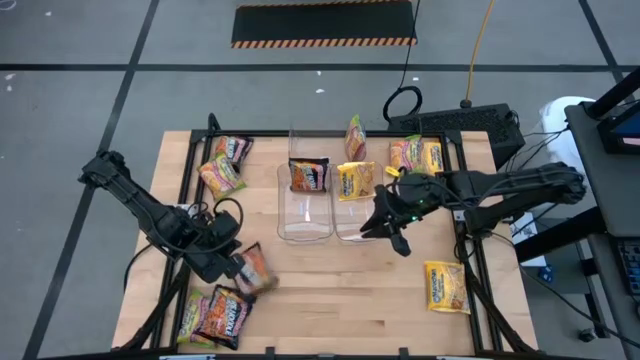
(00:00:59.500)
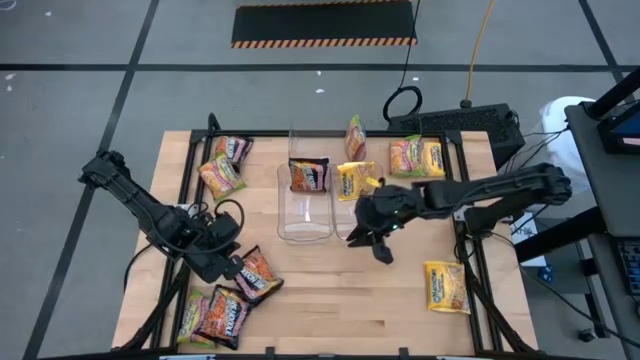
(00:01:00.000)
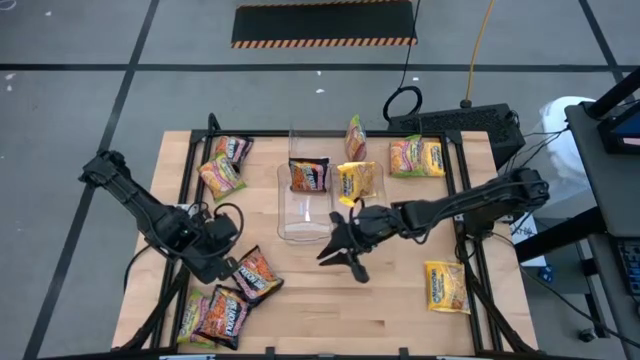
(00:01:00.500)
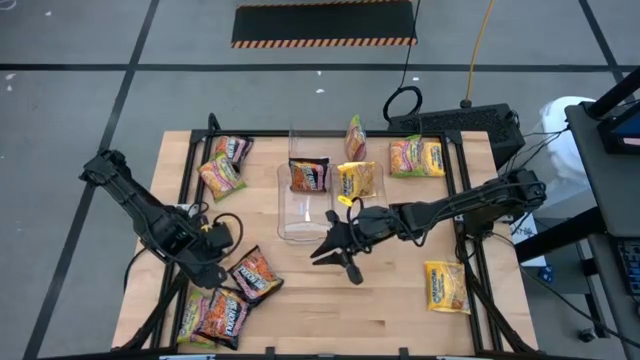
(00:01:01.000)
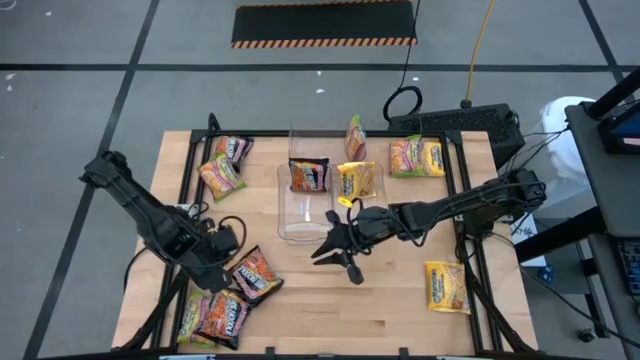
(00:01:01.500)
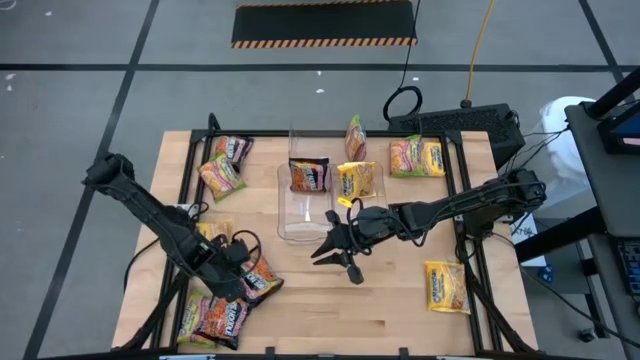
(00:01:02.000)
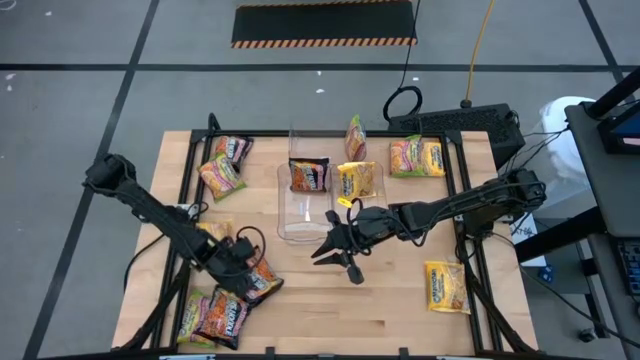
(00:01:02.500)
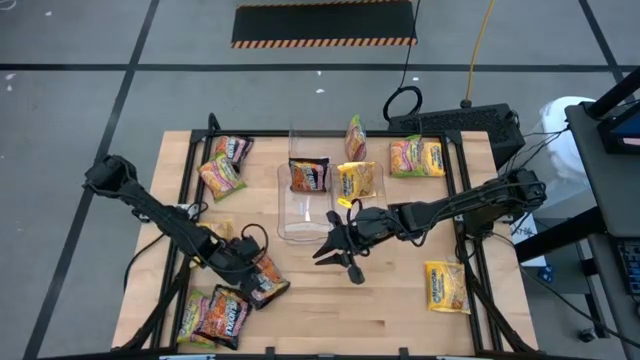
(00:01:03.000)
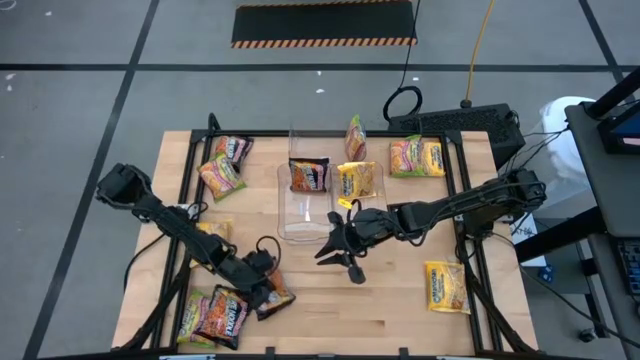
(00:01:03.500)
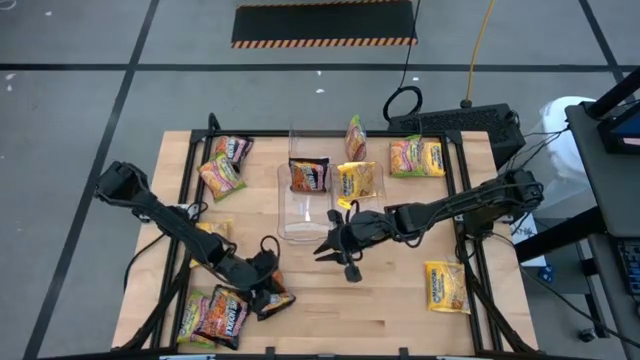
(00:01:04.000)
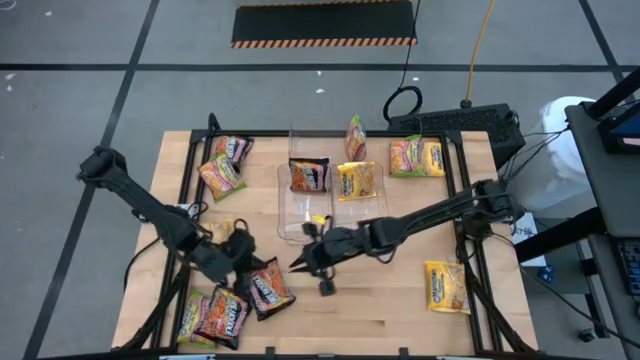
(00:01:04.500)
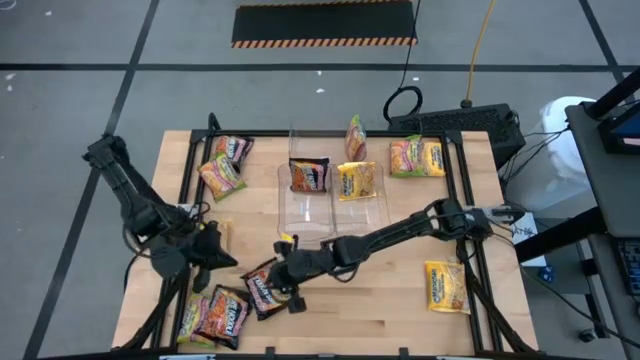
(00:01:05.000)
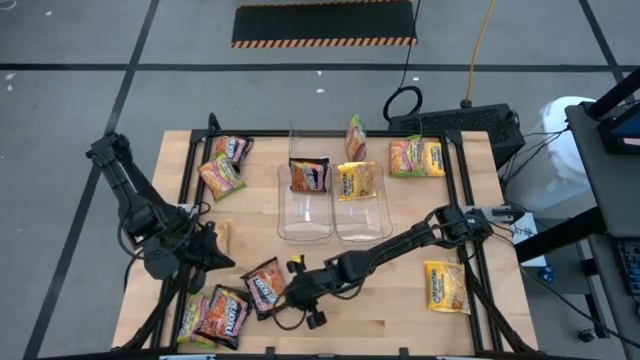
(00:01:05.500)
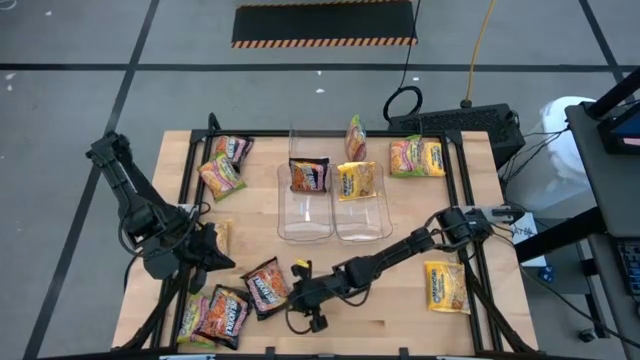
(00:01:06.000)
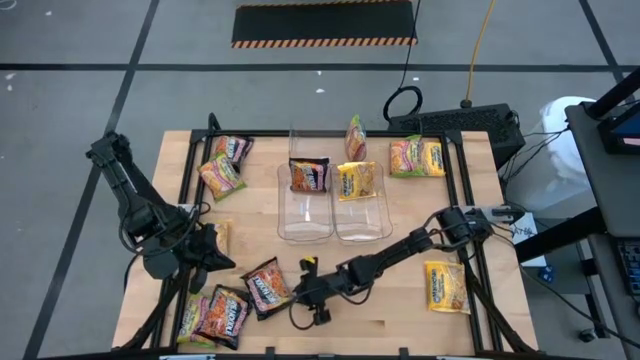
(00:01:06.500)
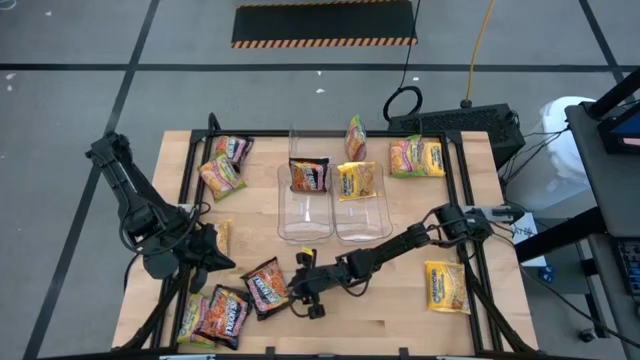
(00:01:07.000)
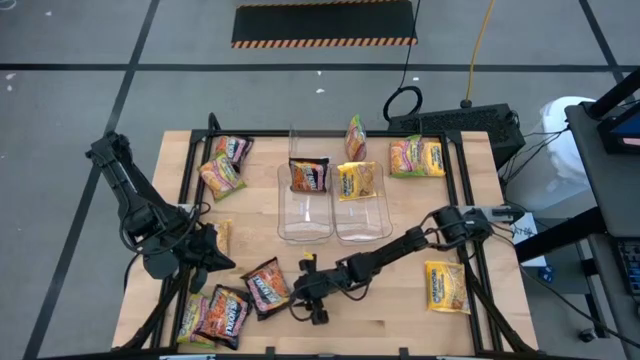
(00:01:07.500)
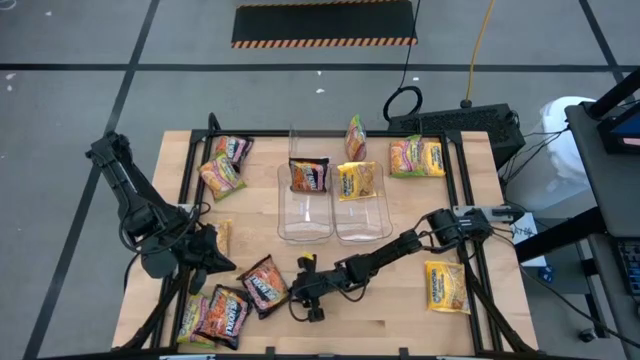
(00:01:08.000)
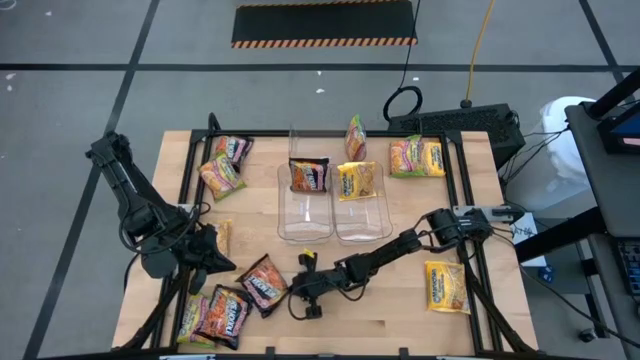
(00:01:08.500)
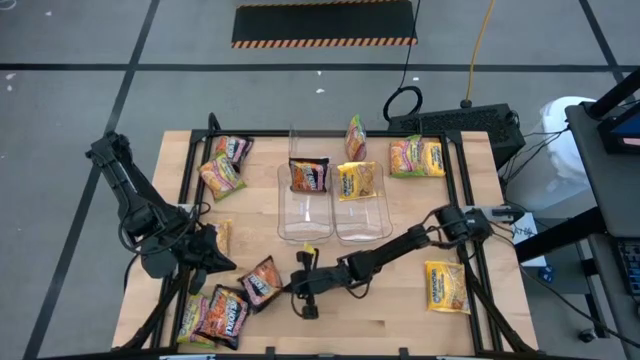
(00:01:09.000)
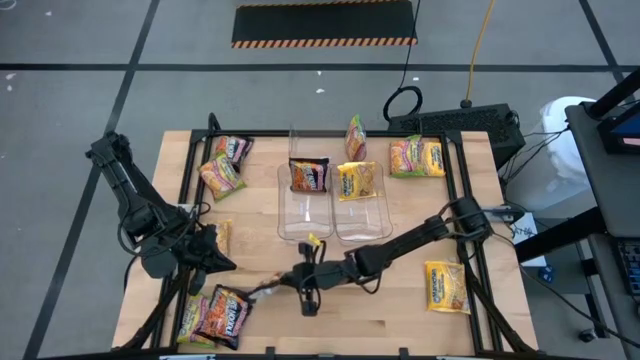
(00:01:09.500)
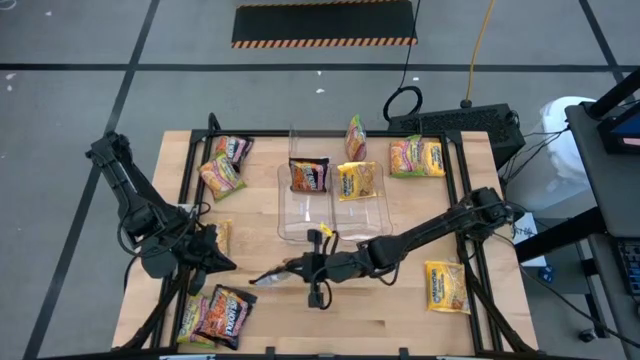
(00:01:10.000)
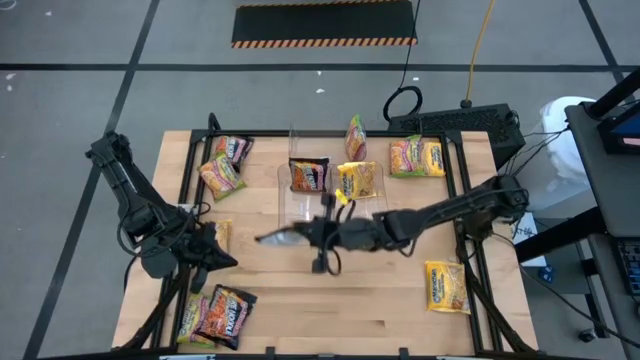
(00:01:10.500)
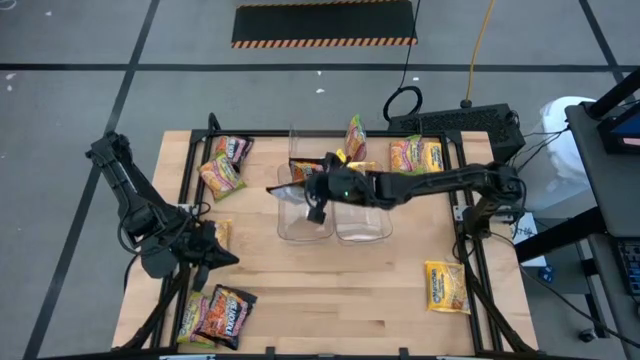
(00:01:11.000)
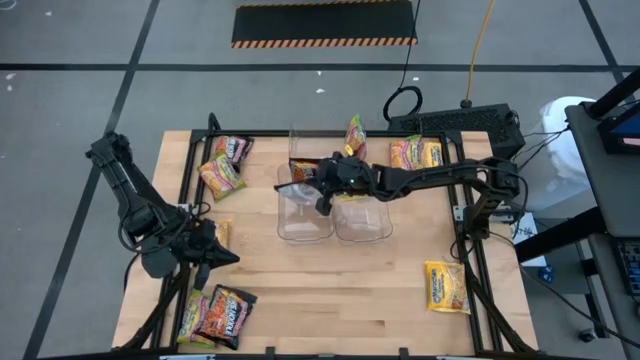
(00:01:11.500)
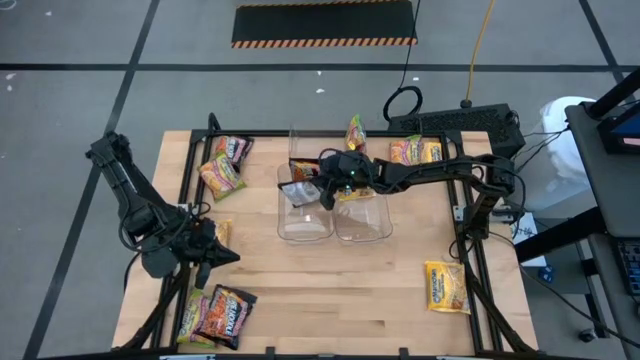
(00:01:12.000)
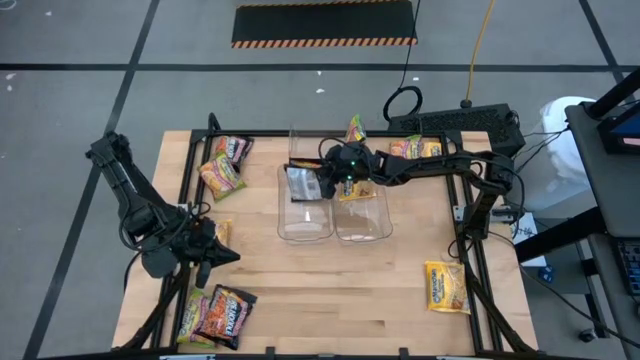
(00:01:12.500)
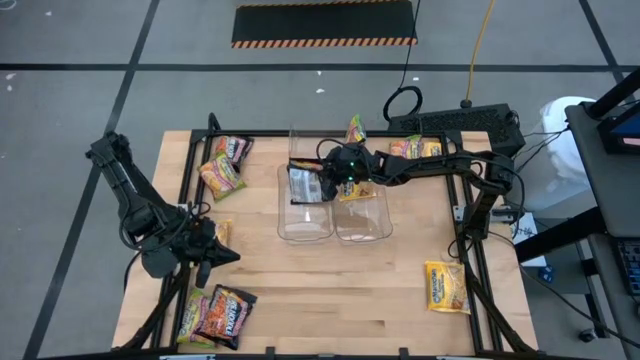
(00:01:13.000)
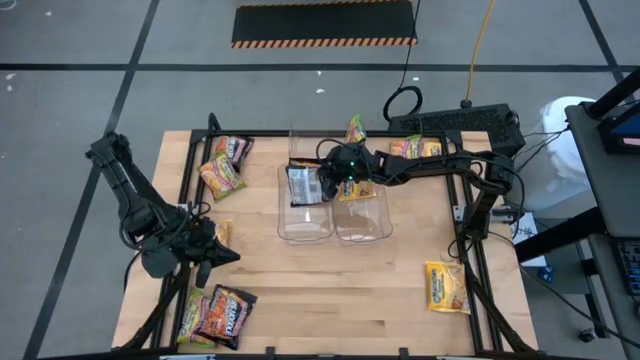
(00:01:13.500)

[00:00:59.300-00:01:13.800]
Task: Sort Maruchan noodles
Put the black noodle pack into the left transparent bin

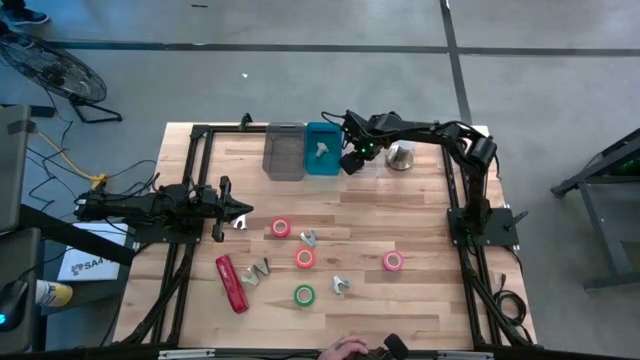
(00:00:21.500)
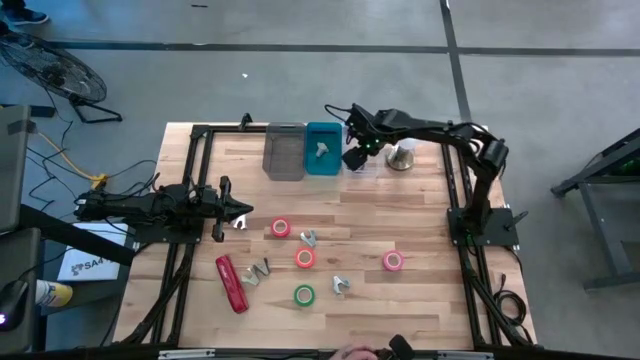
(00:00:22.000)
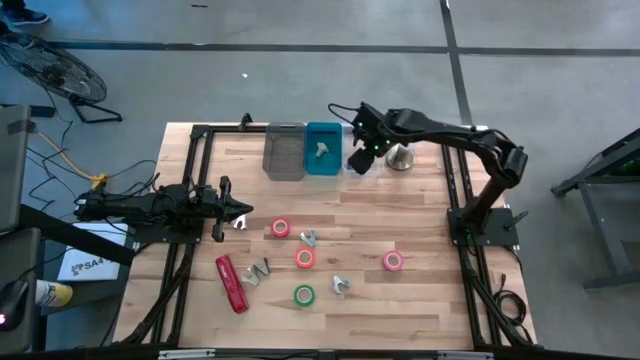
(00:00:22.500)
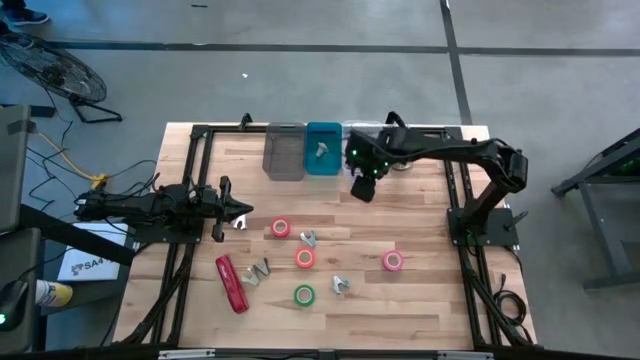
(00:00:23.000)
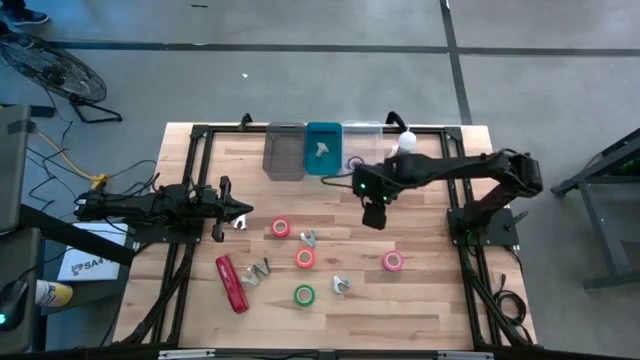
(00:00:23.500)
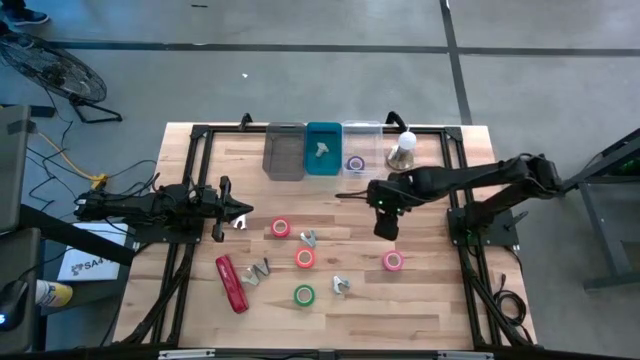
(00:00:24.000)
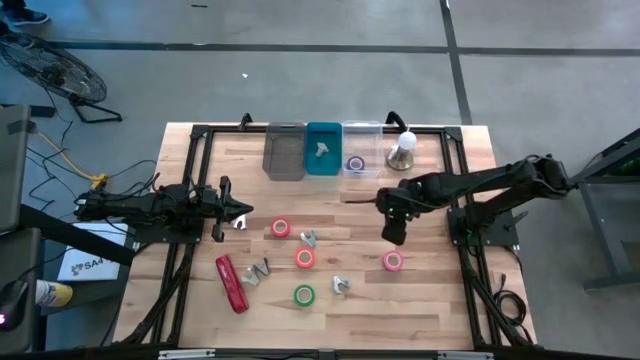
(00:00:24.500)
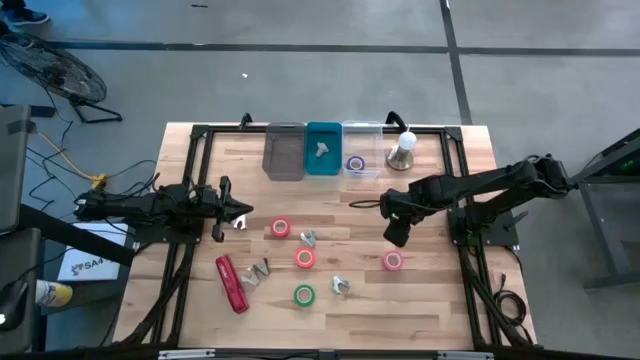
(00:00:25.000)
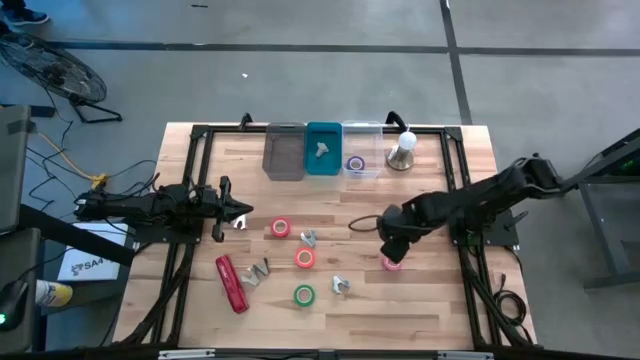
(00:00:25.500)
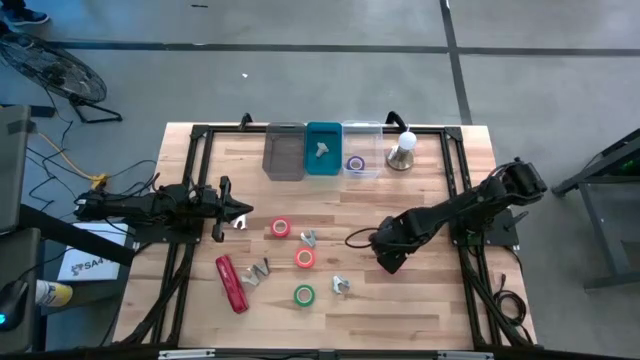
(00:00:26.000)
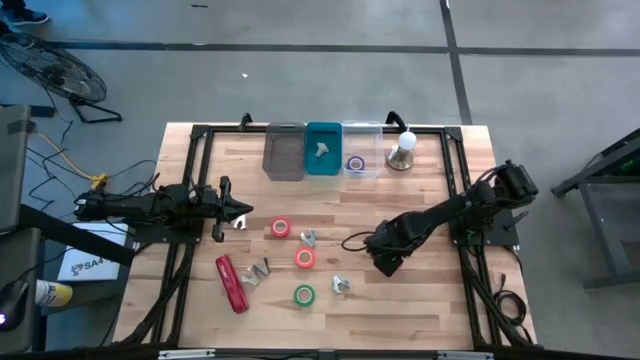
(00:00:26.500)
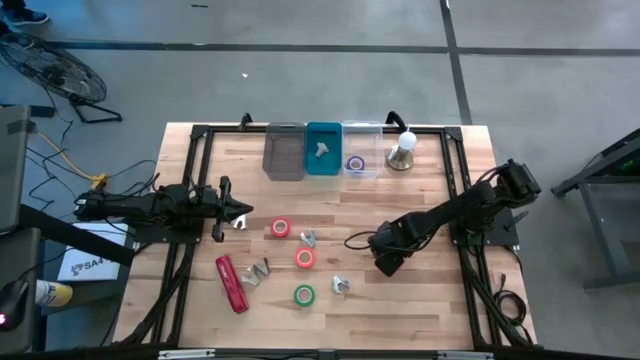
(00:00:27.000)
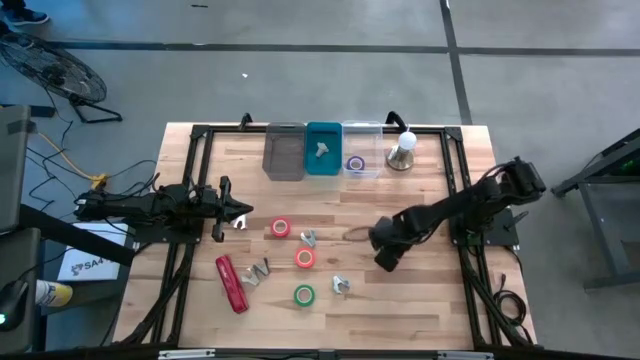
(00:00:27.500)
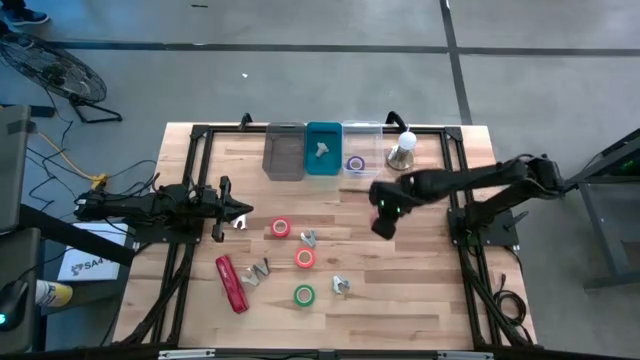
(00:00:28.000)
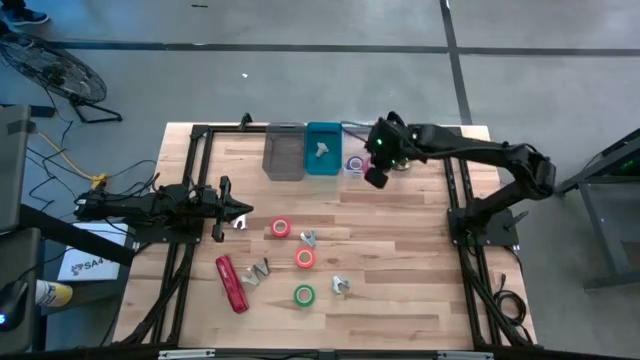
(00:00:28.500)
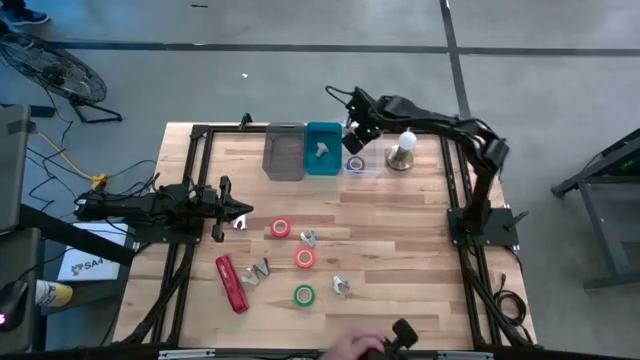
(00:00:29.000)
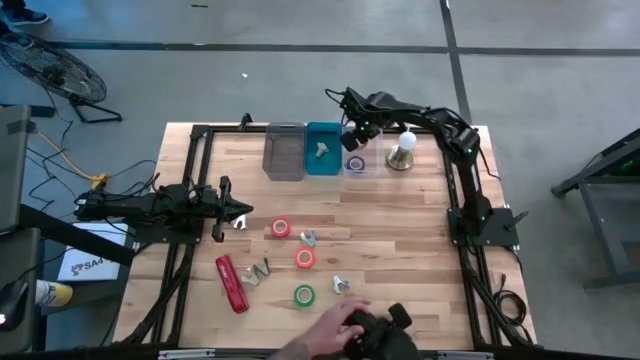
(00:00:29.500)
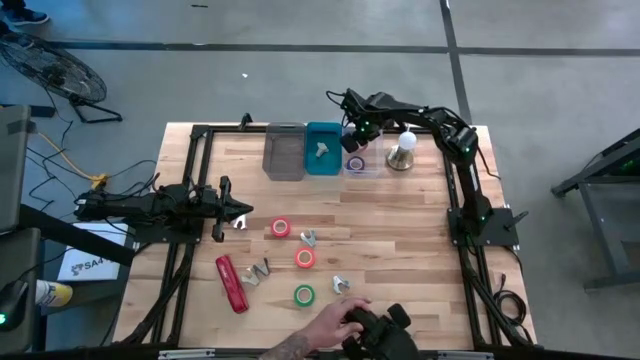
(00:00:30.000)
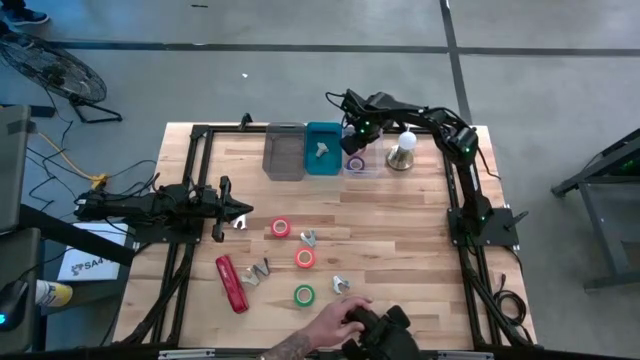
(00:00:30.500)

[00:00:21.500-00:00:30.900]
Task: Pick and place Stapler, Stapler remover, tape
Put the pink tape into the transparent bin
